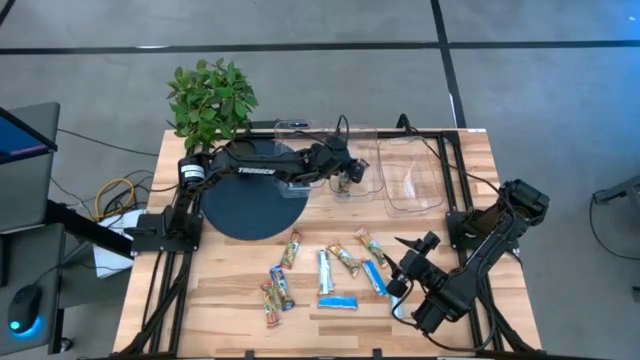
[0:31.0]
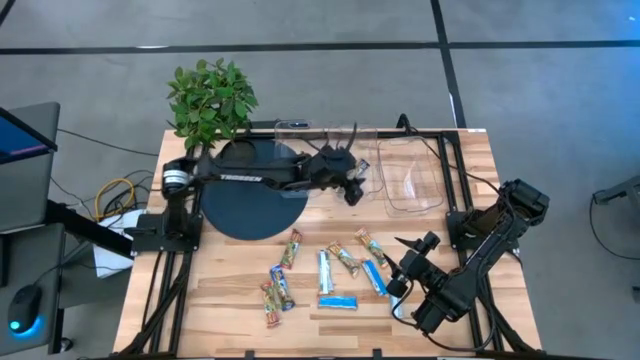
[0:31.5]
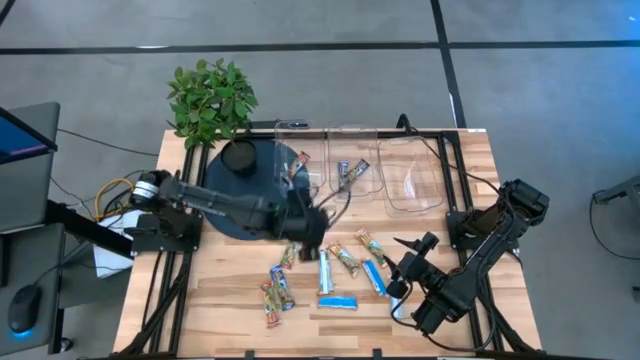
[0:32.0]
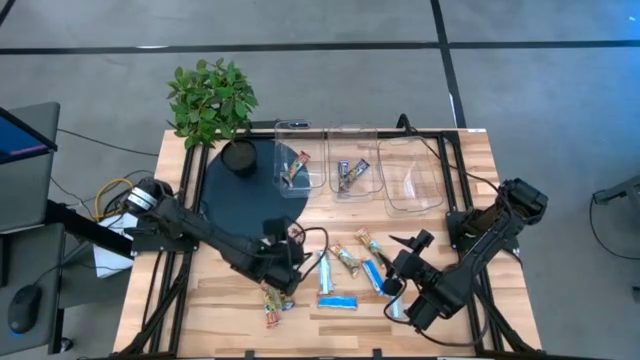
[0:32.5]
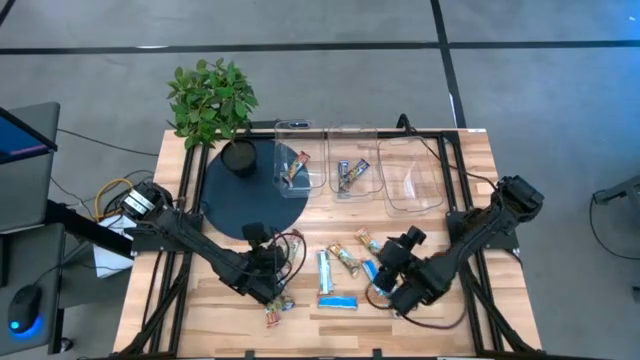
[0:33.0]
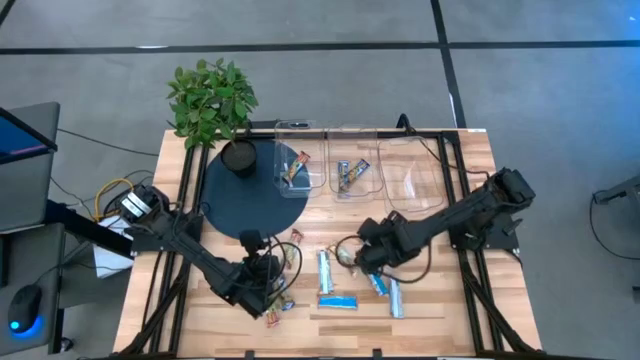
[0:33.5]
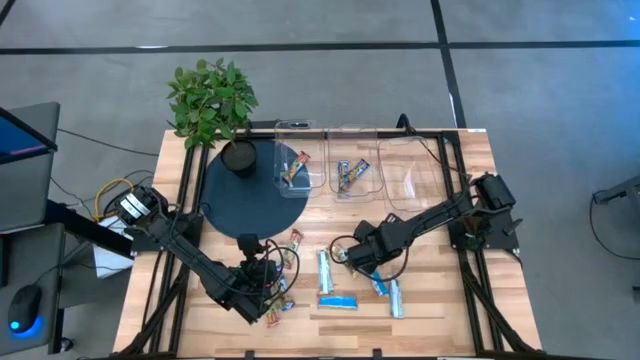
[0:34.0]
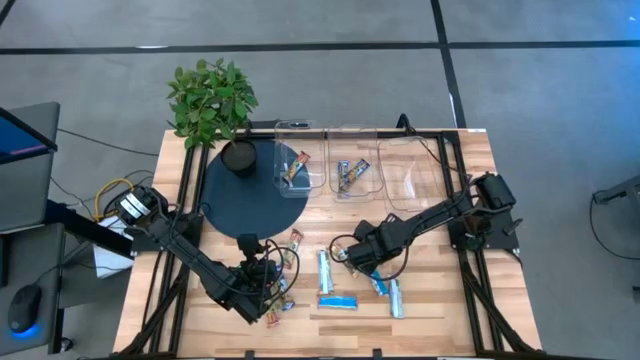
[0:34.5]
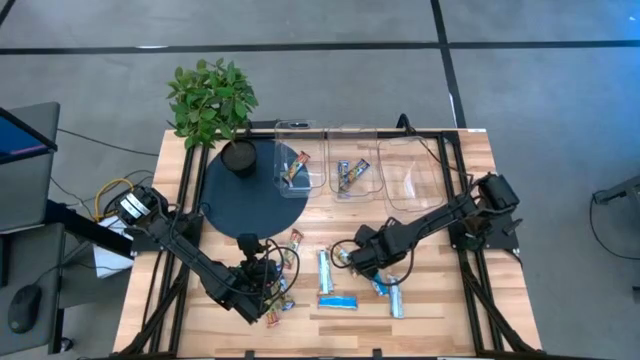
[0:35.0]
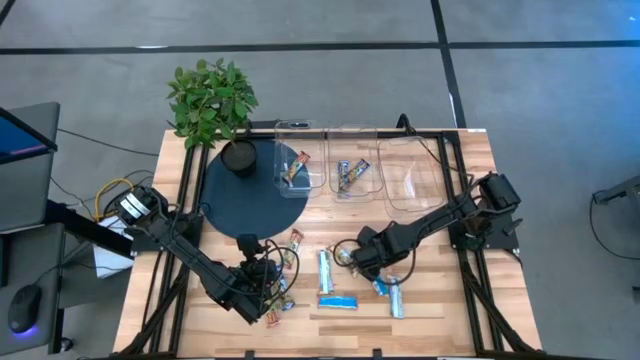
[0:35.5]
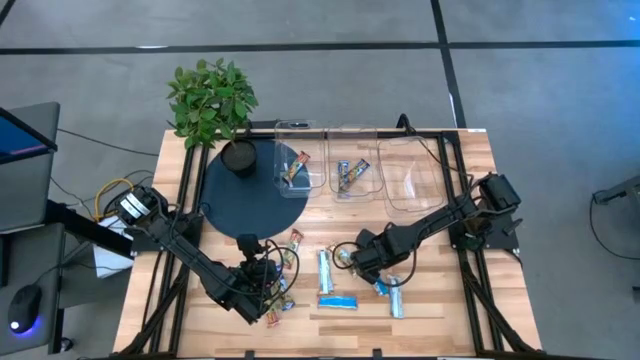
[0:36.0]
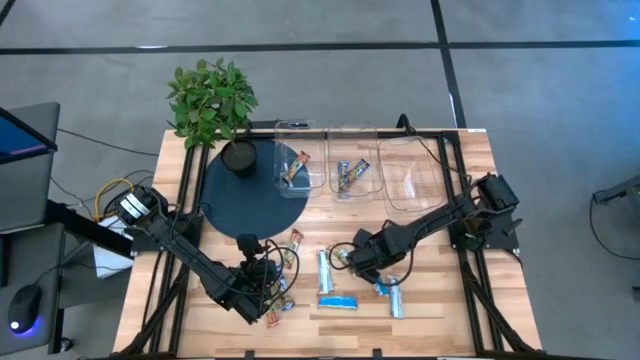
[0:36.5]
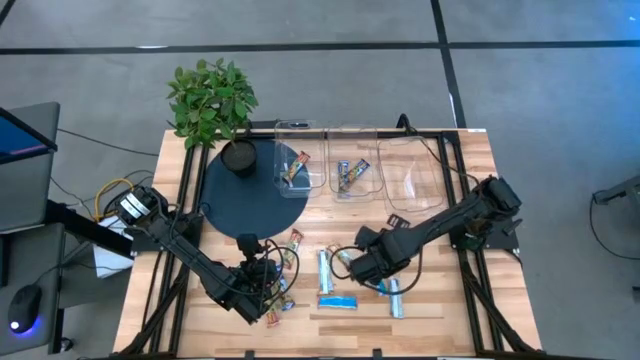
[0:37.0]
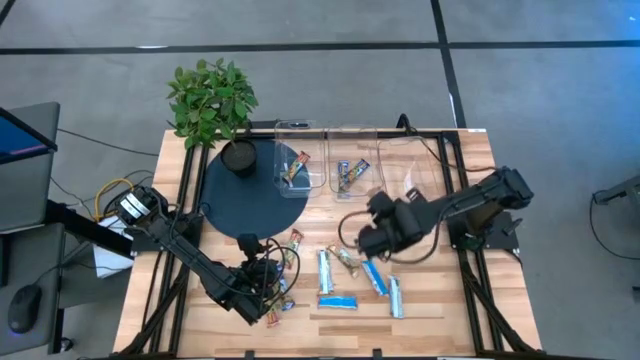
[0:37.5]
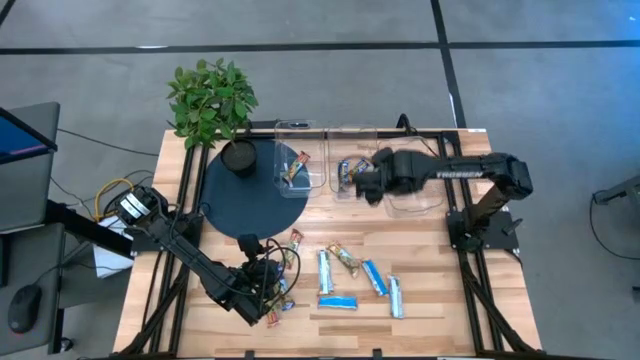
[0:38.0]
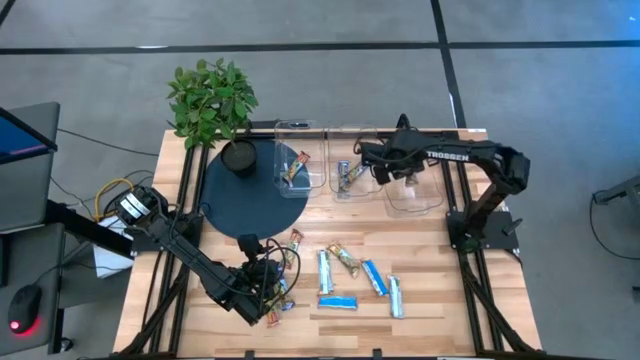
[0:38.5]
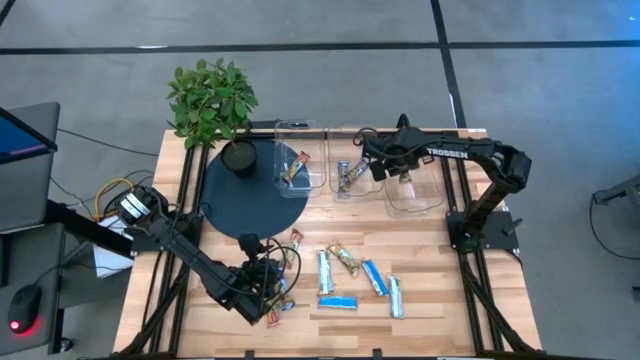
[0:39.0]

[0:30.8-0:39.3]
Task: Pick and place Granola Bars by type
Put the yellow granola bar into the right transparent bin

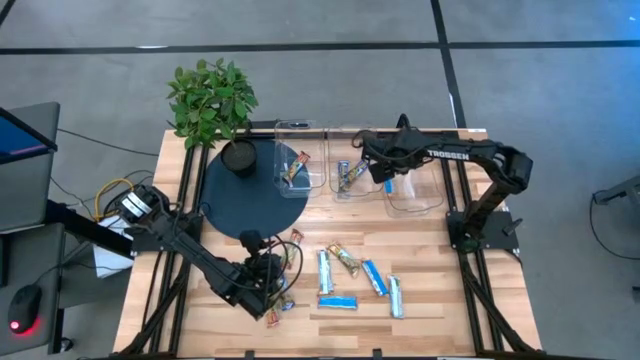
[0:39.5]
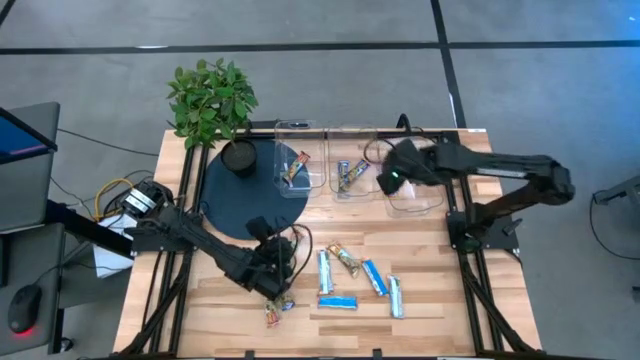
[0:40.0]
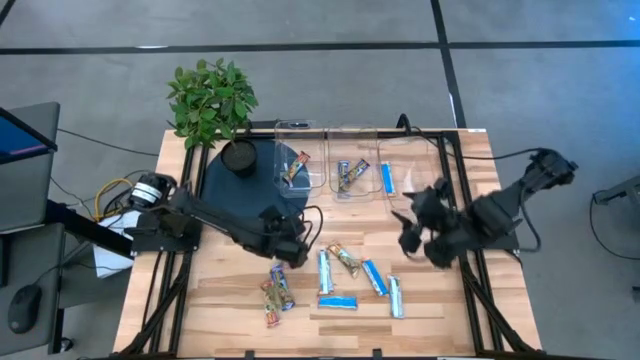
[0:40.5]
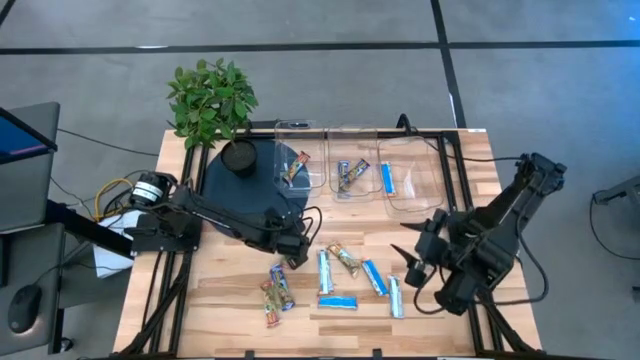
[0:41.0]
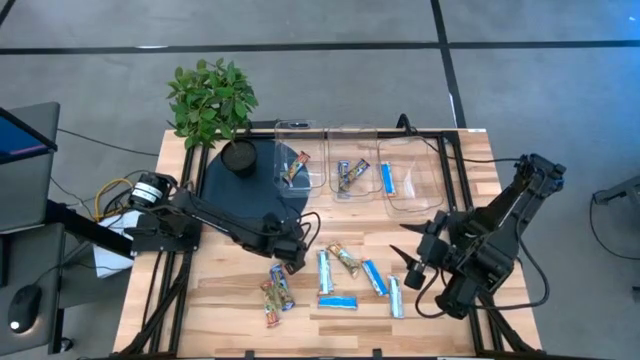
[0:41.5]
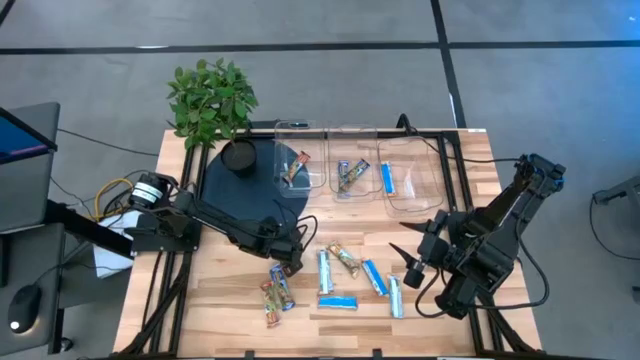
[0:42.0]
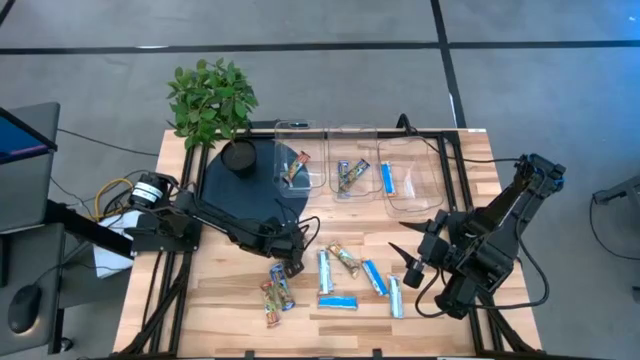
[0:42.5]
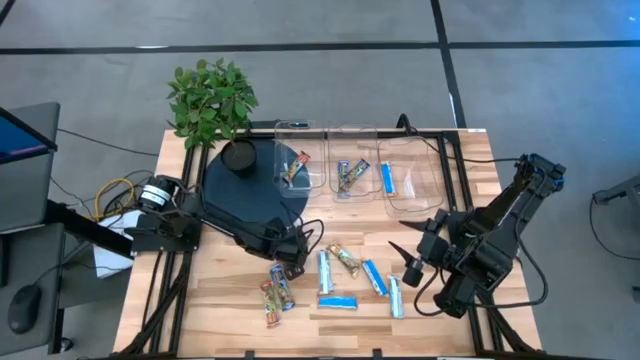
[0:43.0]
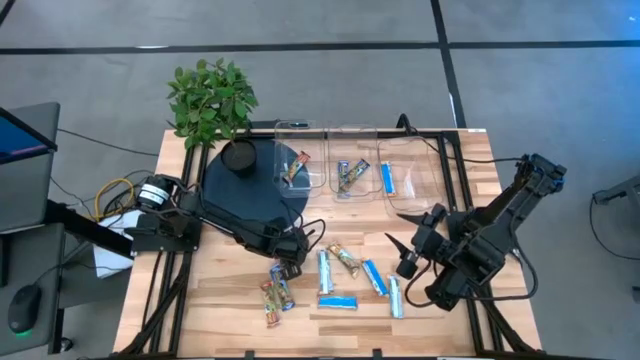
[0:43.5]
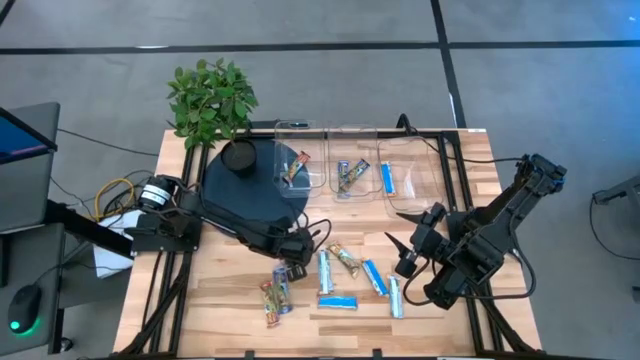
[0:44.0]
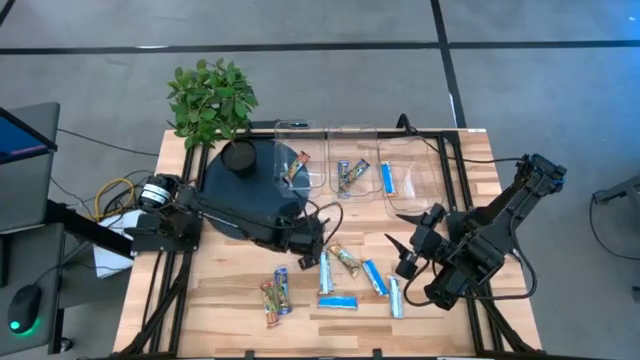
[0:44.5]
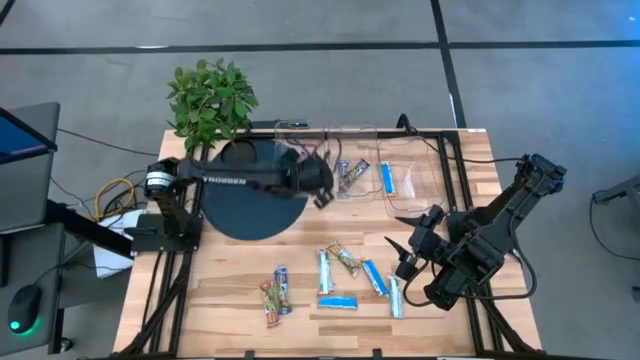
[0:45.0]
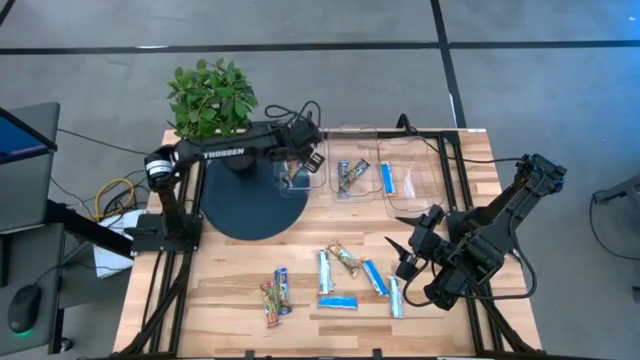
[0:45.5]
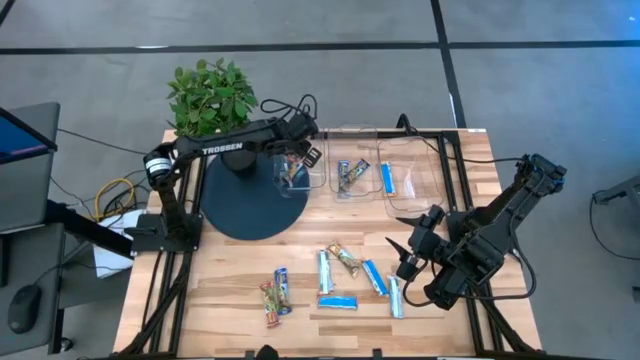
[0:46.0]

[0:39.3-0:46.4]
Put the red granola bar into the left transparent bin

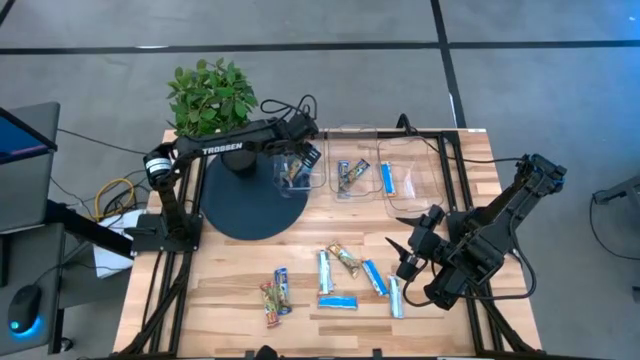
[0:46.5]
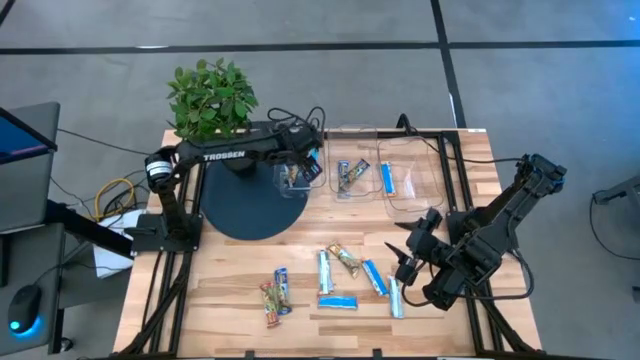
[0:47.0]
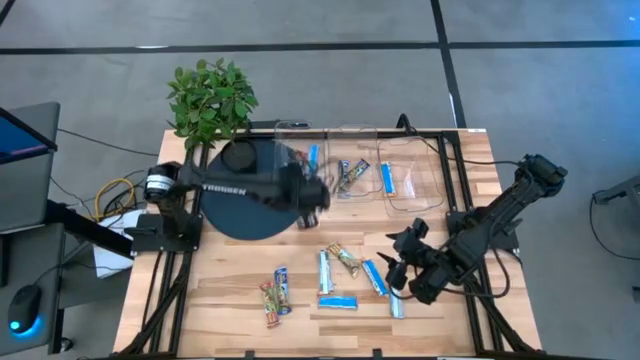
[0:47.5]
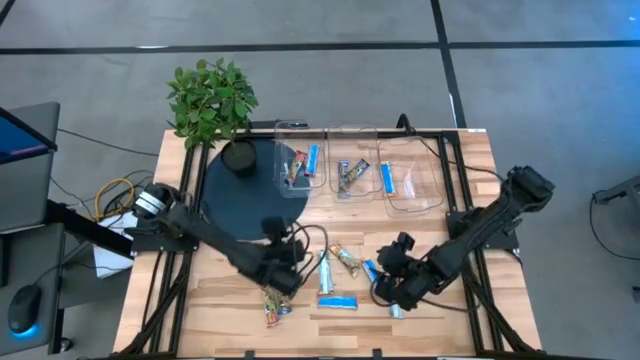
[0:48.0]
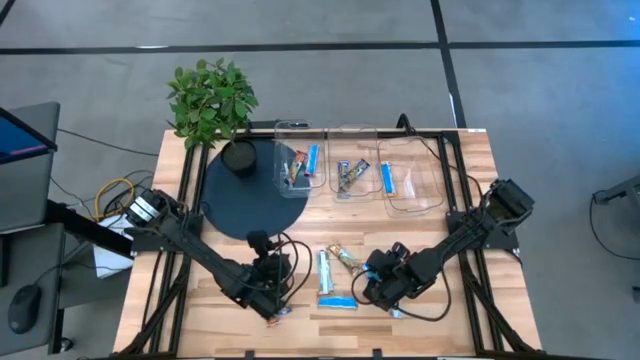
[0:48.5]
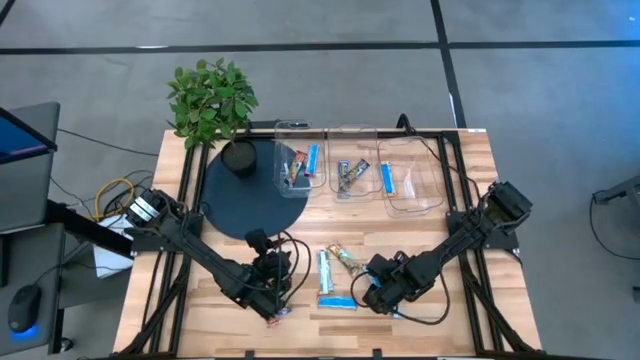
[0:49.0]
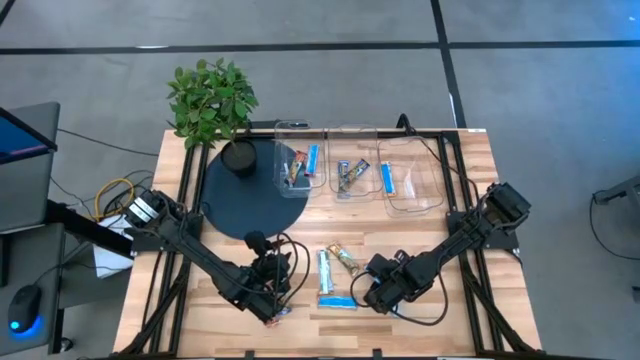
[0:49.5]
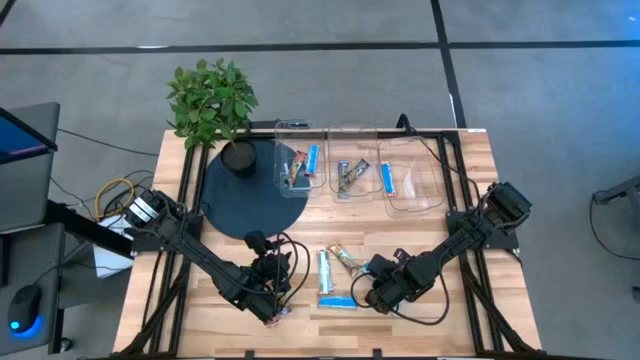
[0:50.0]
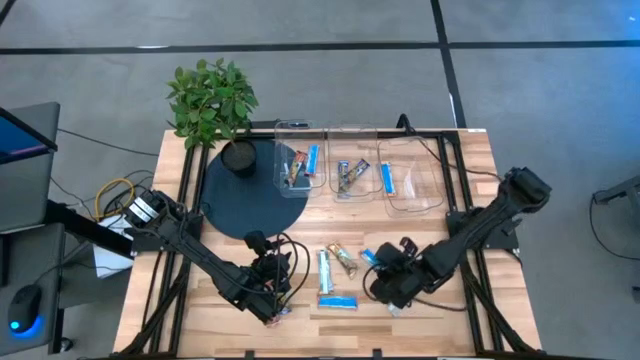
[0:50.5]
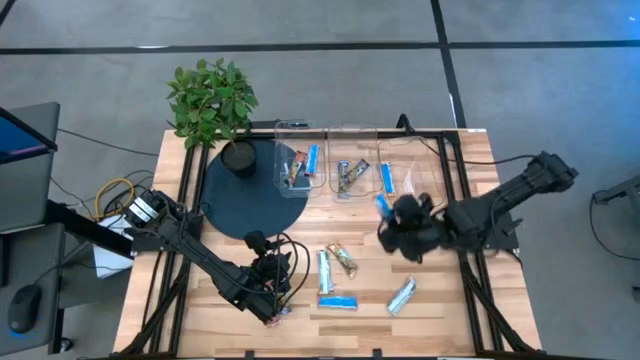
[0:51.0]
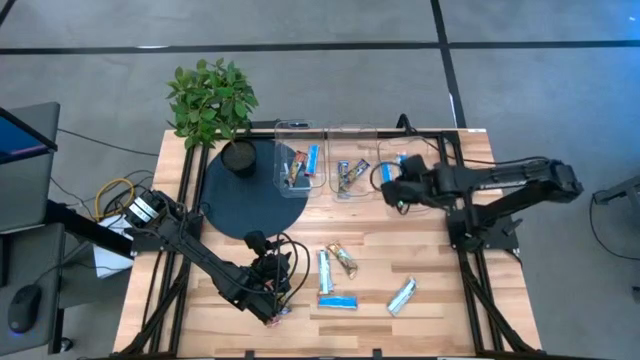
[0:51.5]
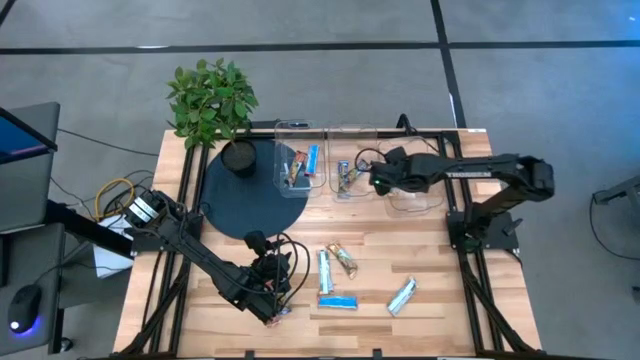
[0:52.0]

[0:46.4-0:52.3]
Put the yellow granola bar into the right transparent bin
